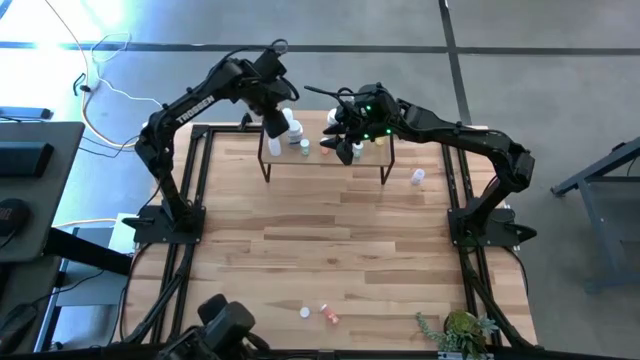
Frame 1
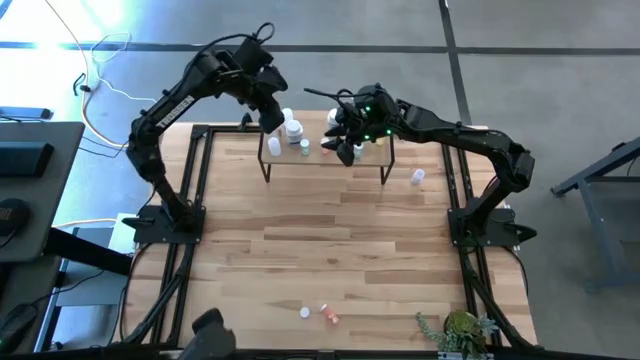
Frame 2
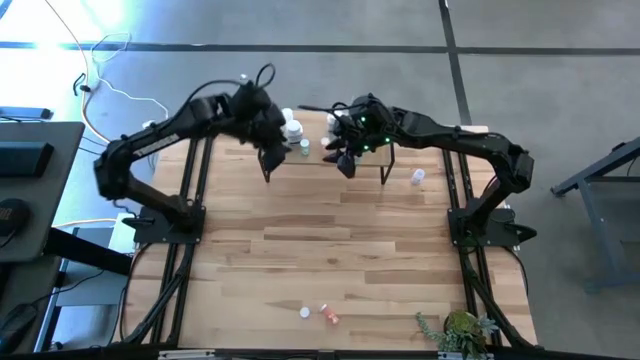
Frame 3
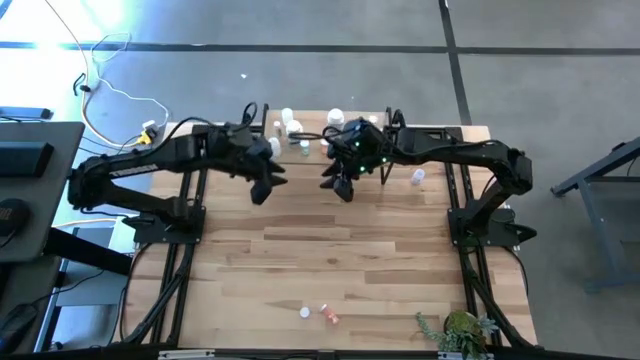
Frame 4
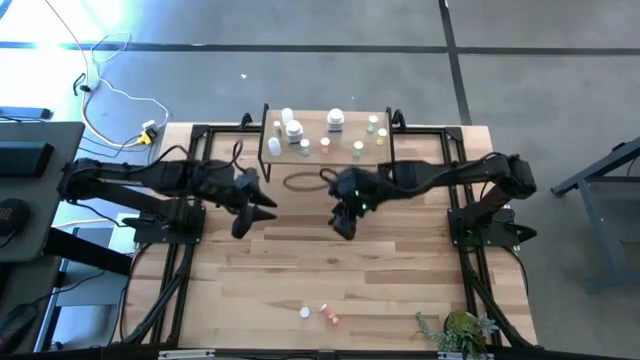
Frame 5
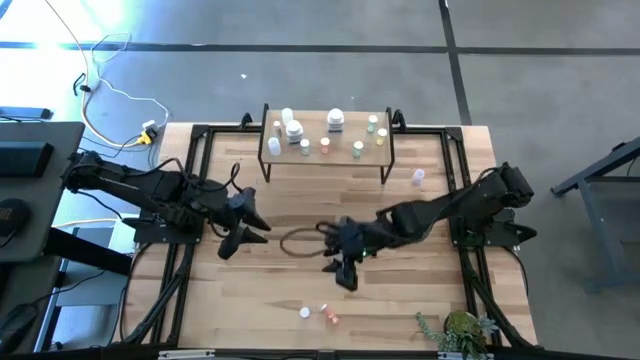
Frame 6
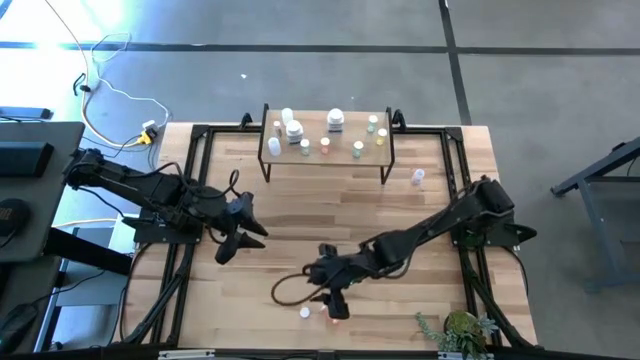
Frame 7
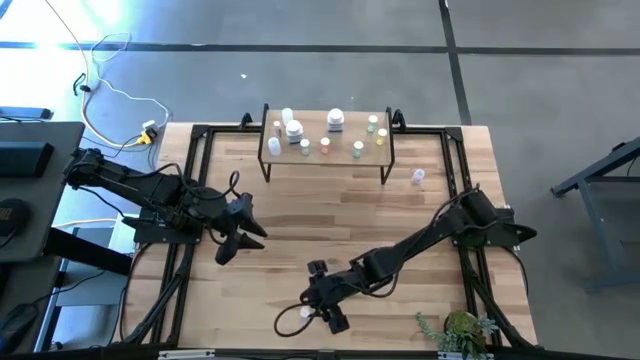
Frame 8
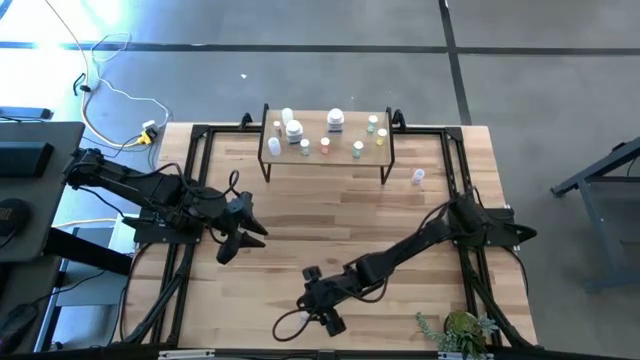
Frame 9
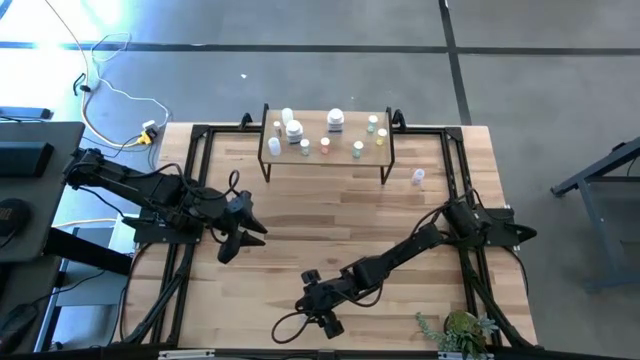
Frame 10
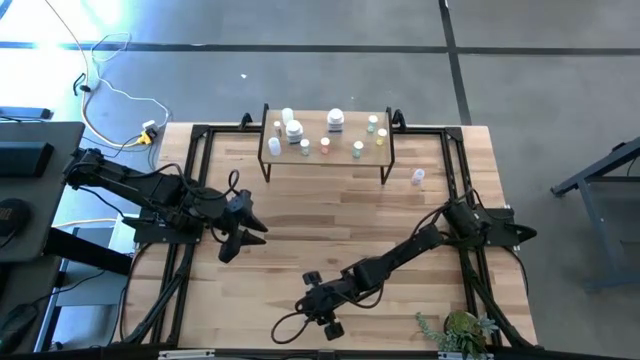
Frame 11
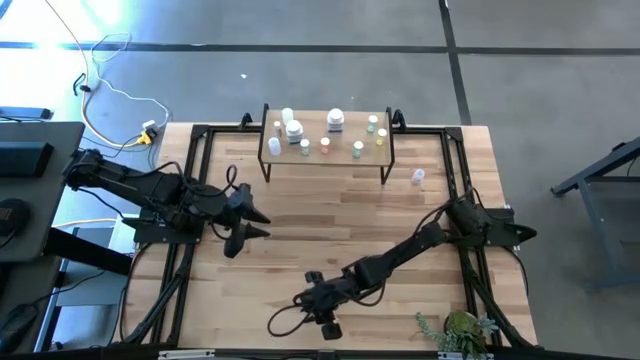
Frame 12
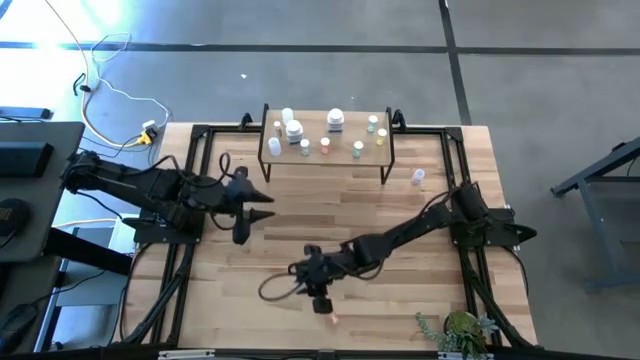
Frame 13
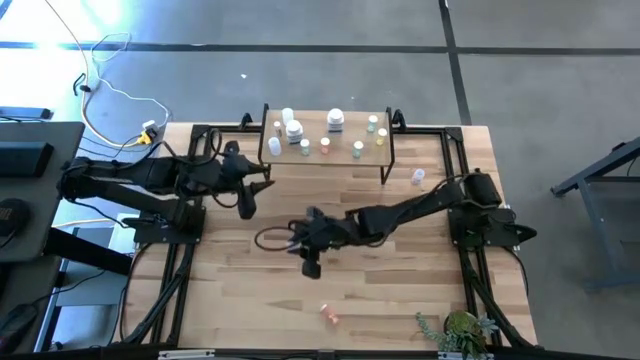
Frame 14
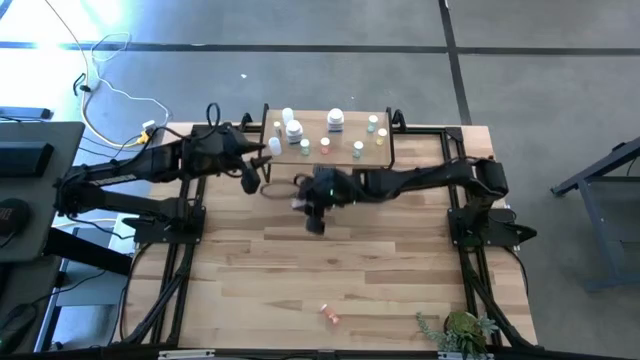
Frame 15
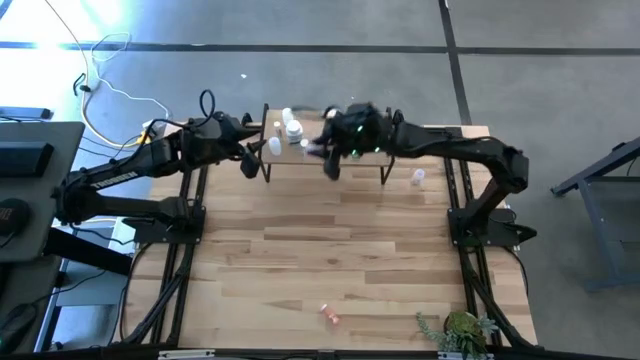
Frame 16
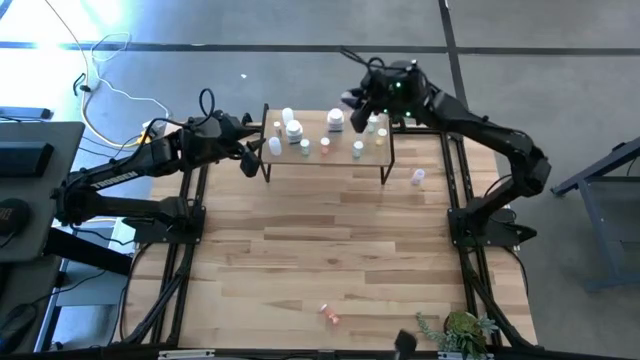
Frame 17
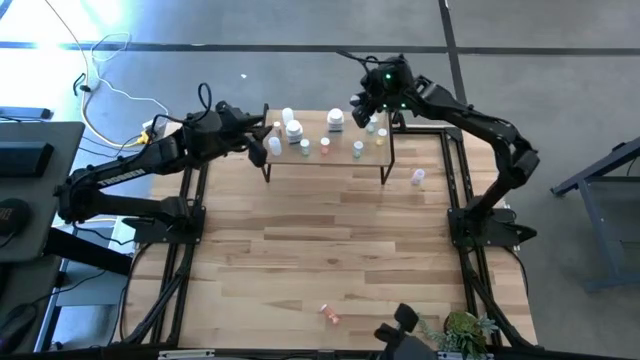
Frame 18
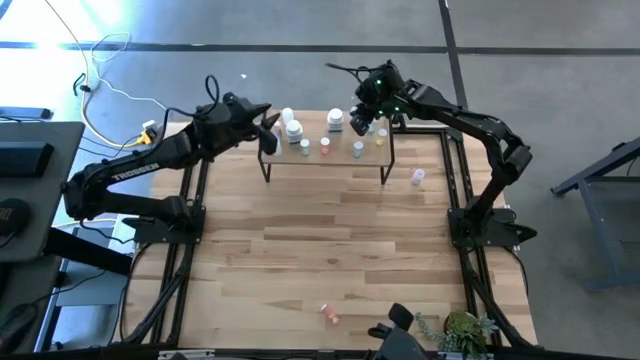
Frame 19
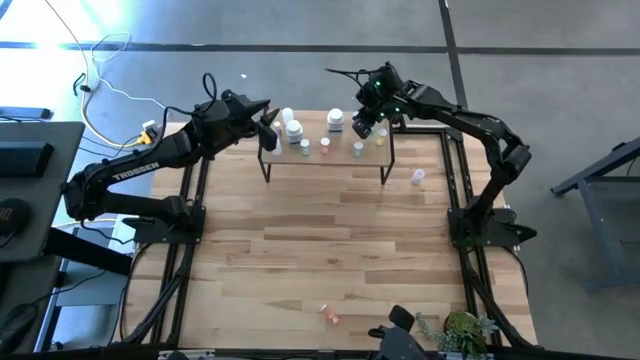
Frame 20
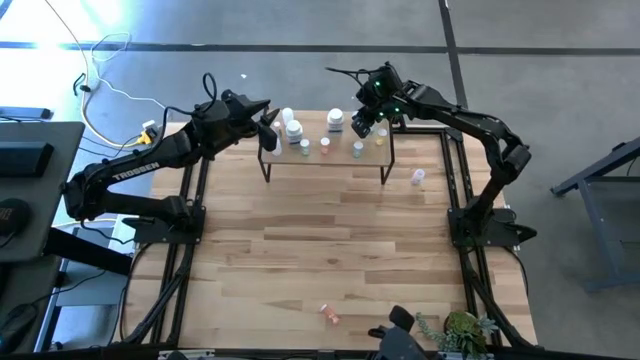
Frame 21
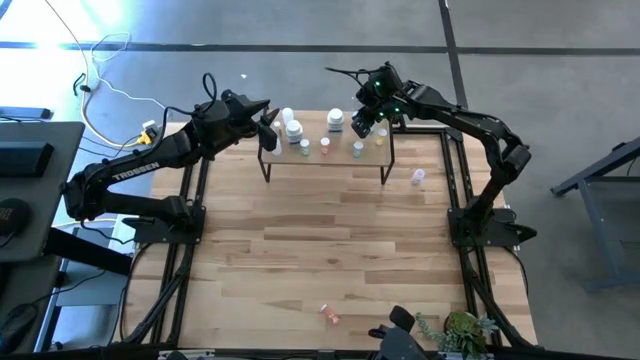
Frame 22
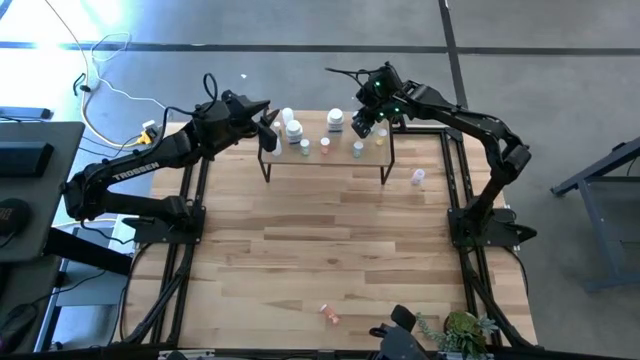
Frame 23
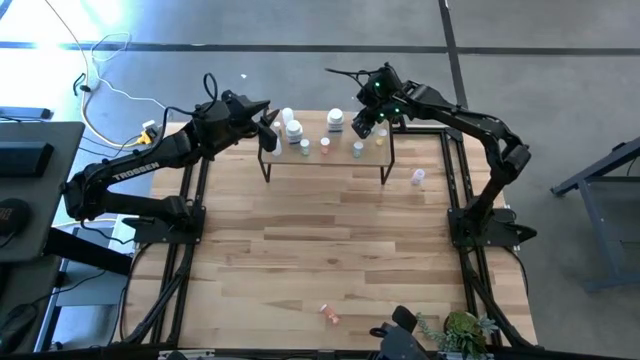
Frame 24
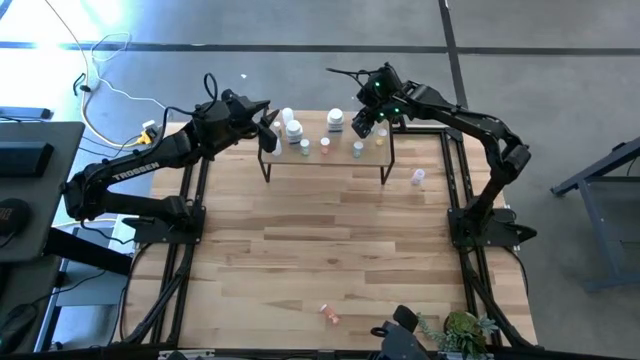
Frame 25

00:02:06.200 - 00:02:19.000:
Task: Pick and place medicine bottles onto shelf by color
Put the purple pill bottle on the shelf

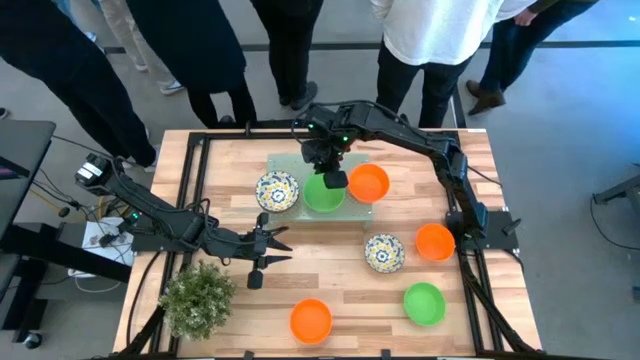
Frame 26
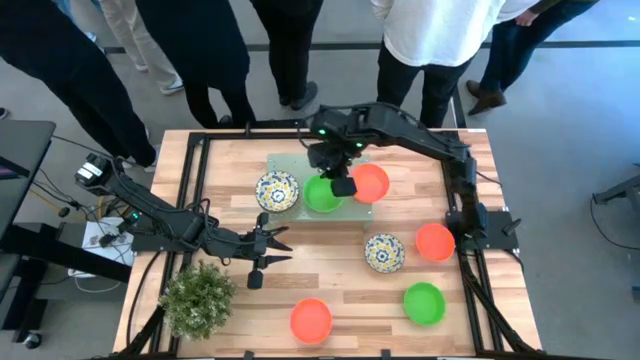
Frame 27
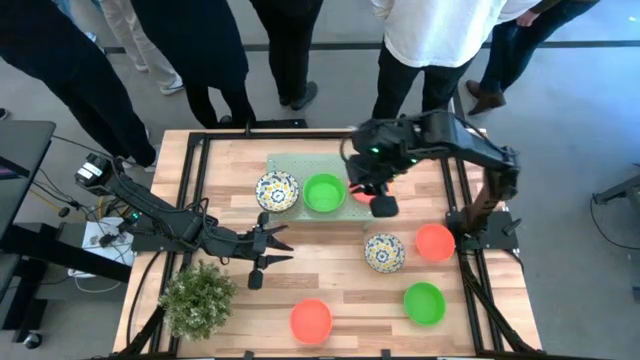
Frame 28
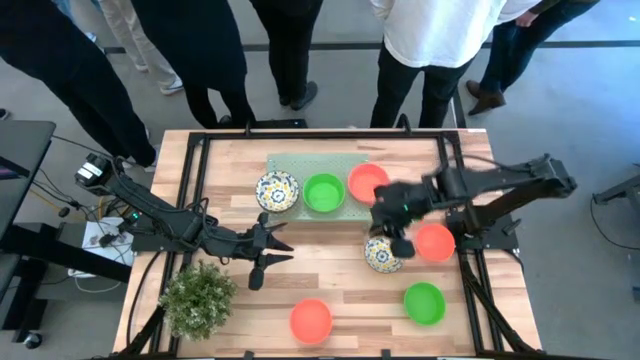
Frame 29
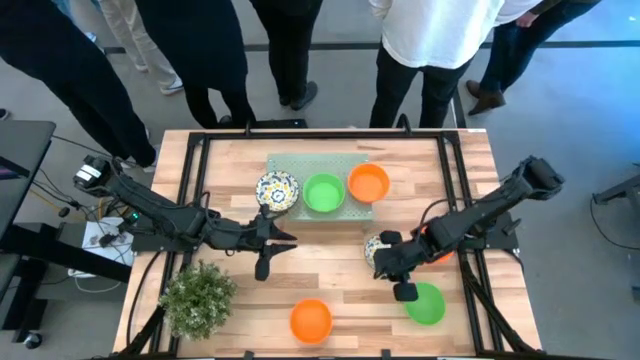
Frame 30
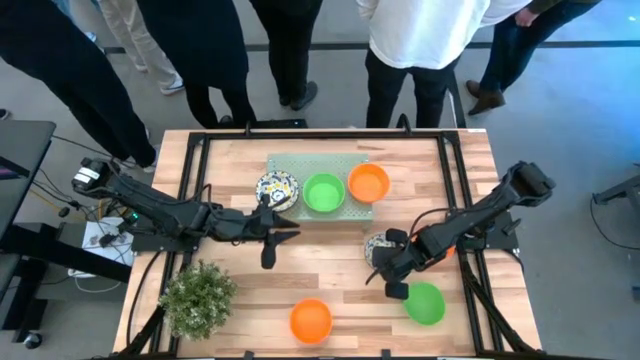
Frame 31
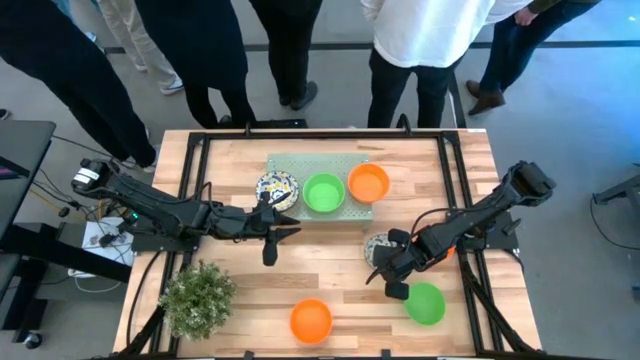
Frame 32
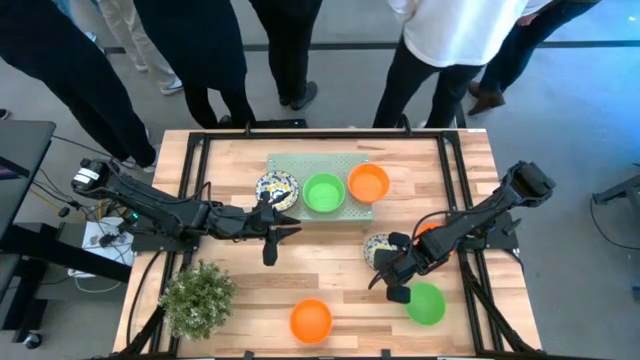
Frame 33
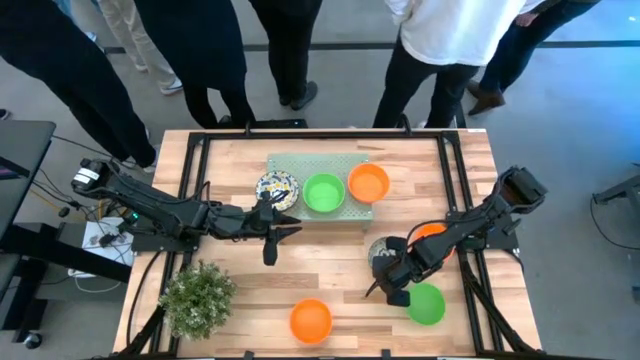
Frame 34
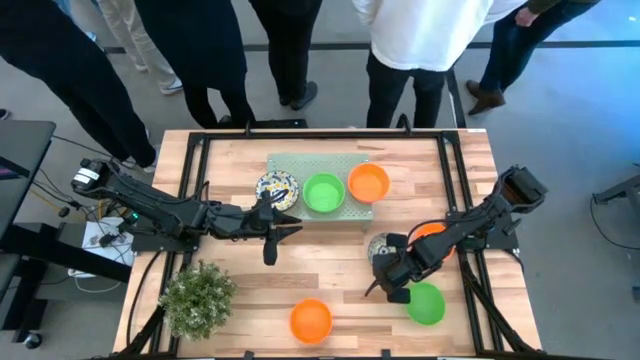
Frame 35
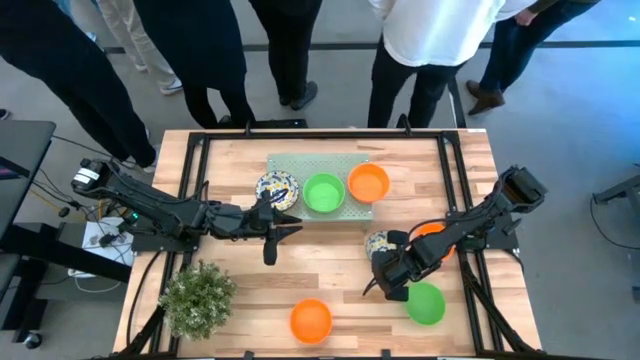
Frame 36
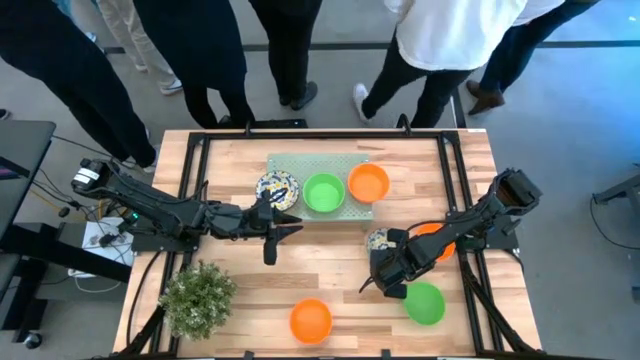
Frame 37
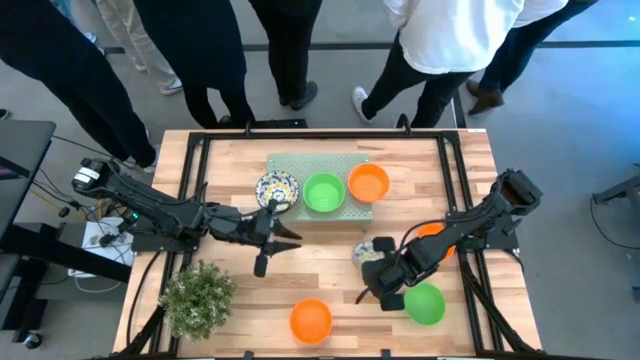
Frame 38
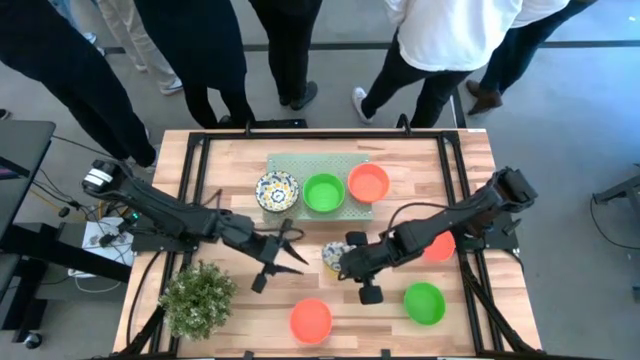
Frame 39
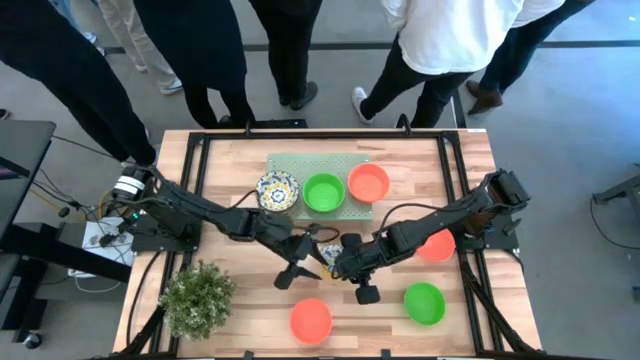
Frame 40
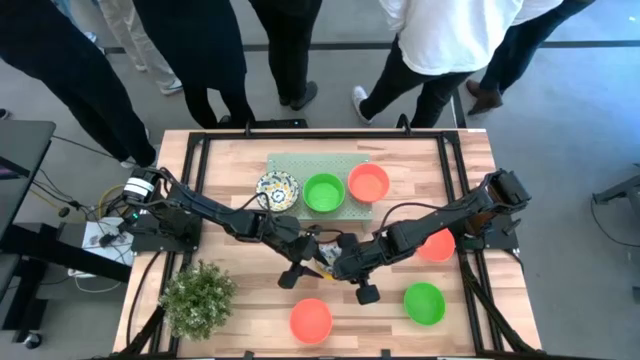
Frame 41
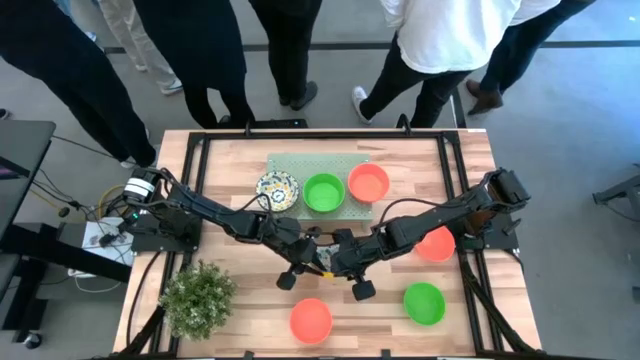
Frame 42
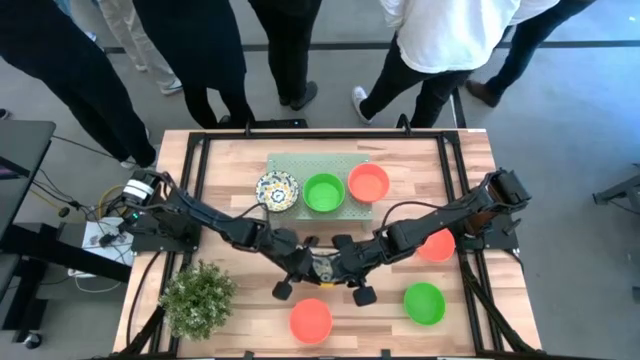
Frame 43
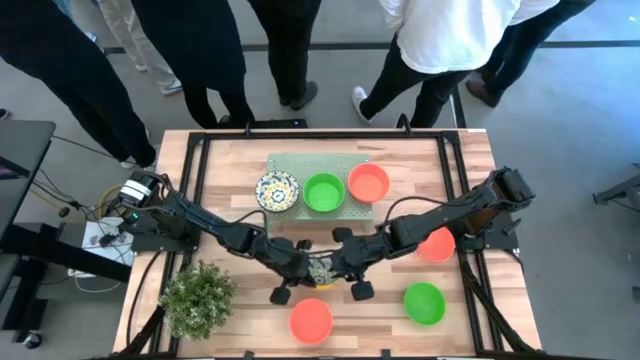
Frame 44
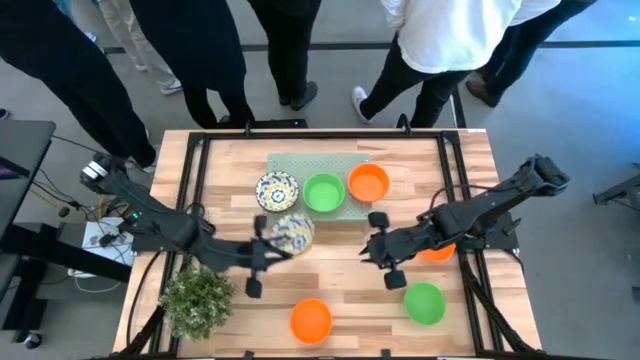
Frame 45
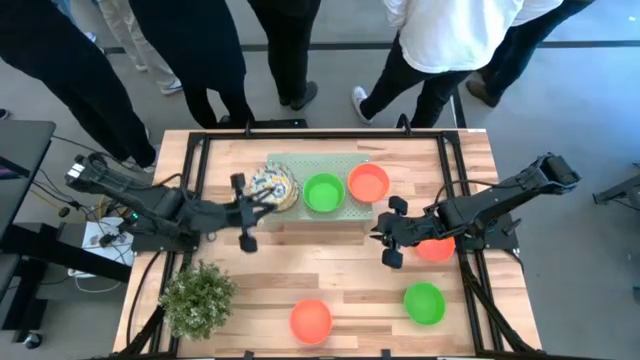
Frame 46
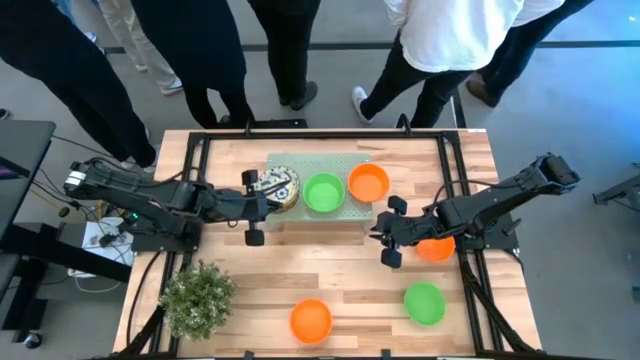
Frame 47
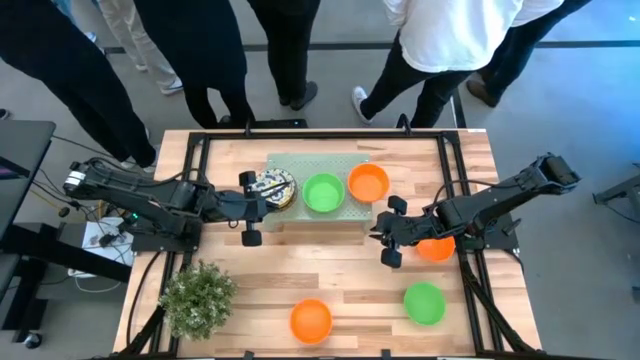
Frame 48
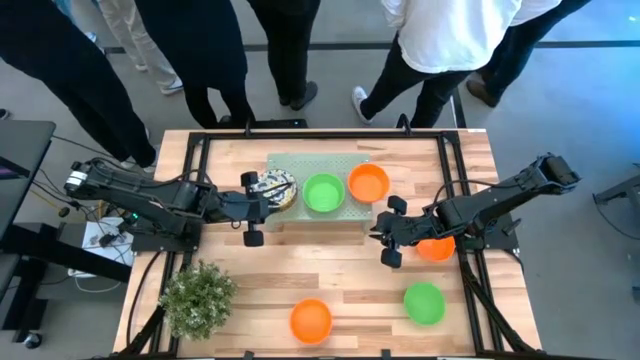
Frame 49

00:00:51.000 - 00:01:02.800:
Task: Pick & Place Mini bowls
Stack the white patterned bowl on top of the white patterned bowl on the shelf
